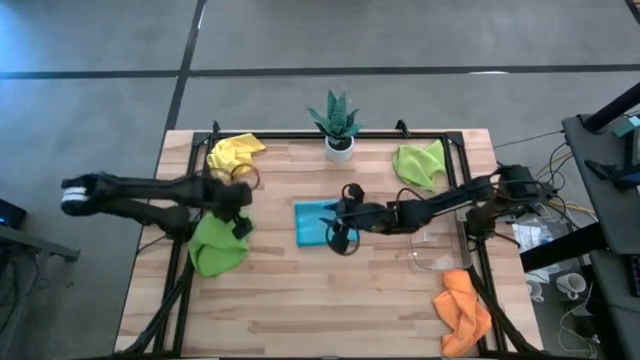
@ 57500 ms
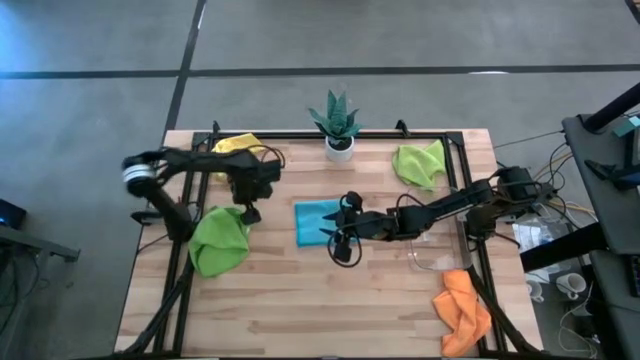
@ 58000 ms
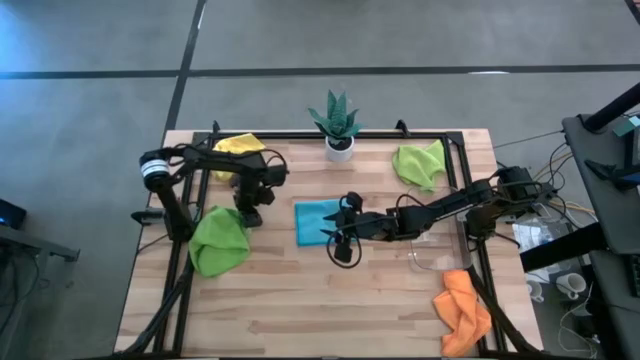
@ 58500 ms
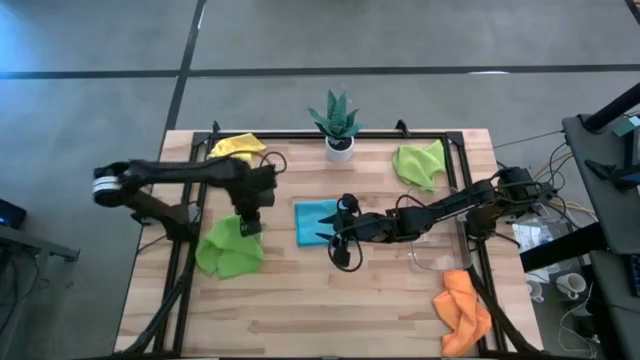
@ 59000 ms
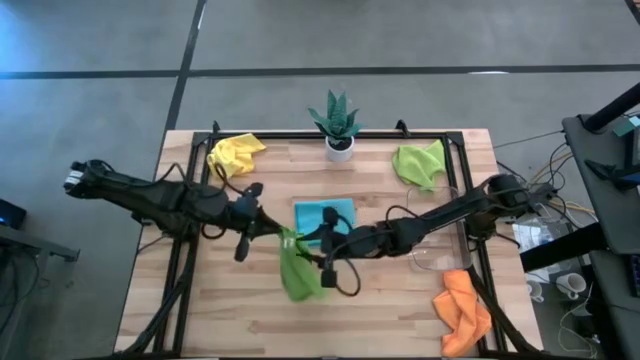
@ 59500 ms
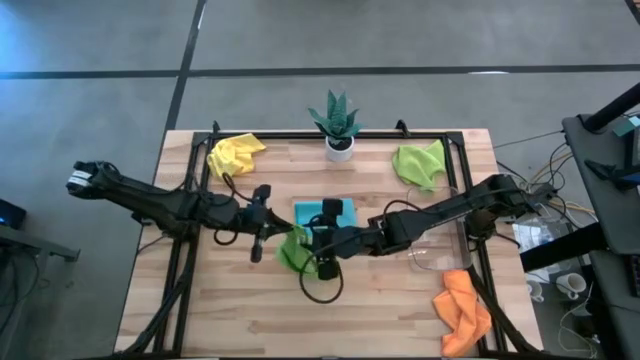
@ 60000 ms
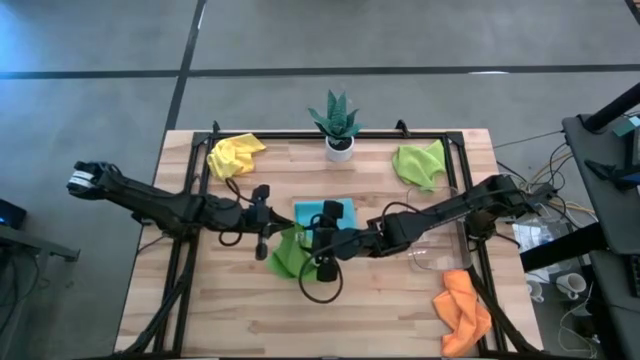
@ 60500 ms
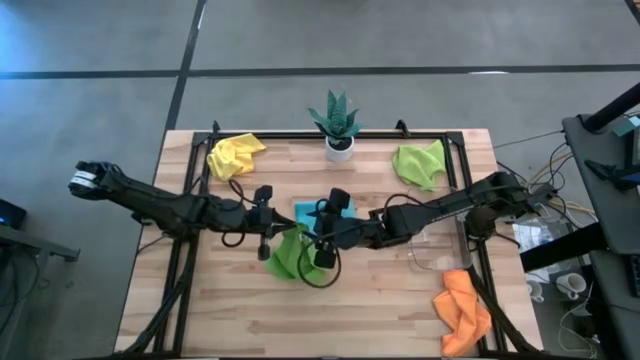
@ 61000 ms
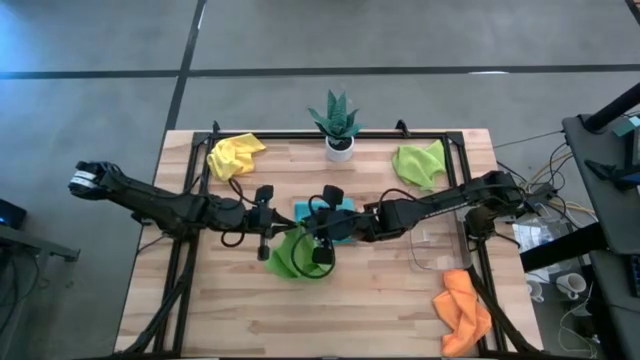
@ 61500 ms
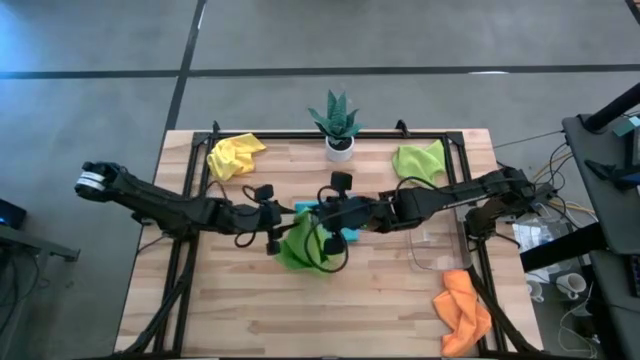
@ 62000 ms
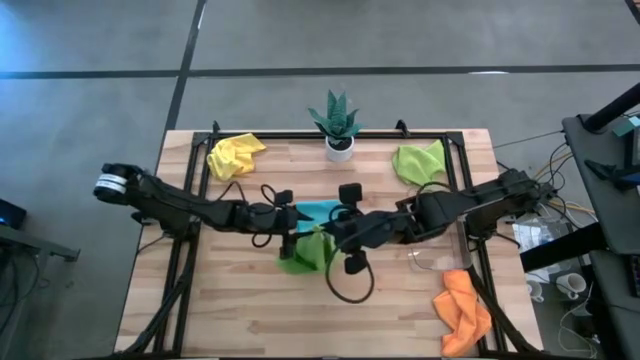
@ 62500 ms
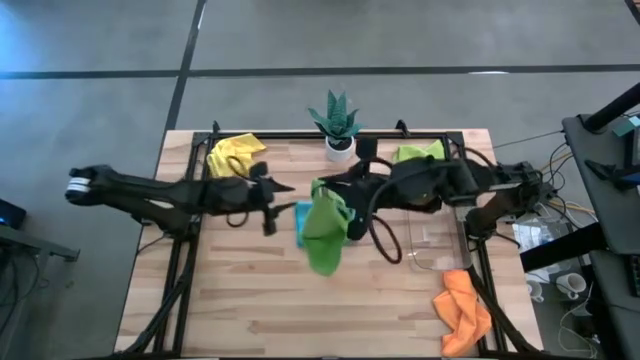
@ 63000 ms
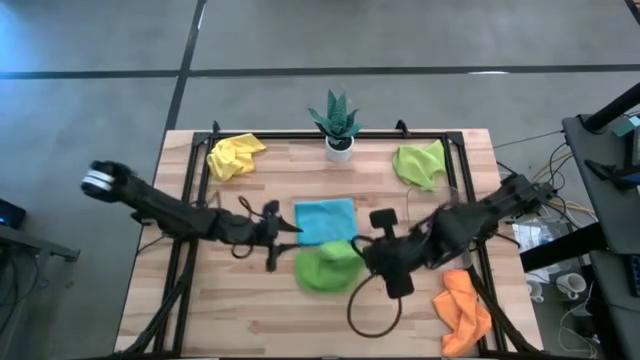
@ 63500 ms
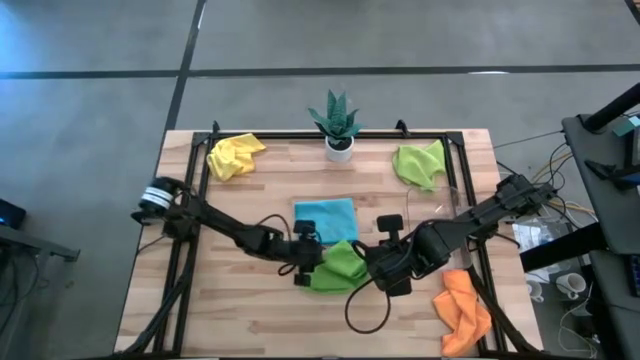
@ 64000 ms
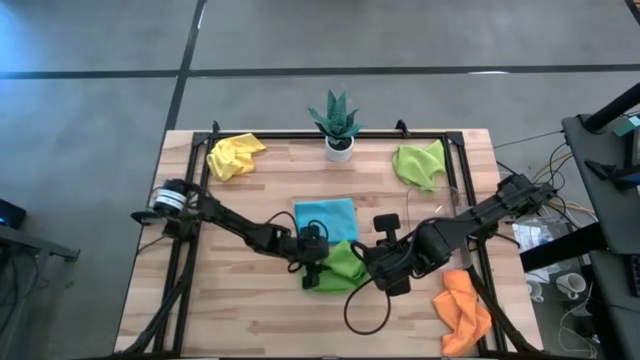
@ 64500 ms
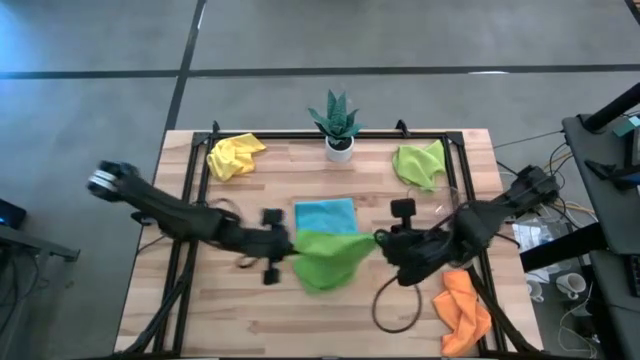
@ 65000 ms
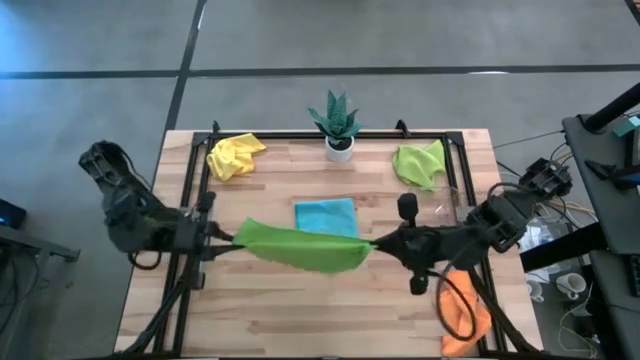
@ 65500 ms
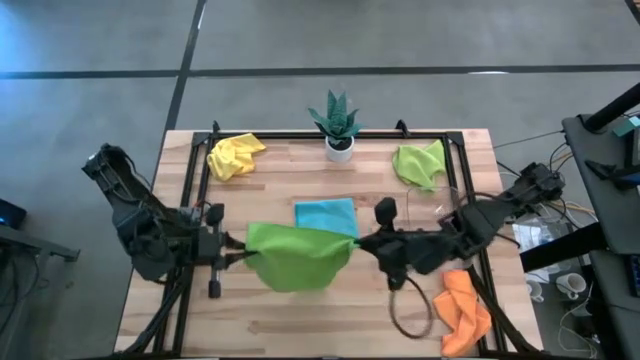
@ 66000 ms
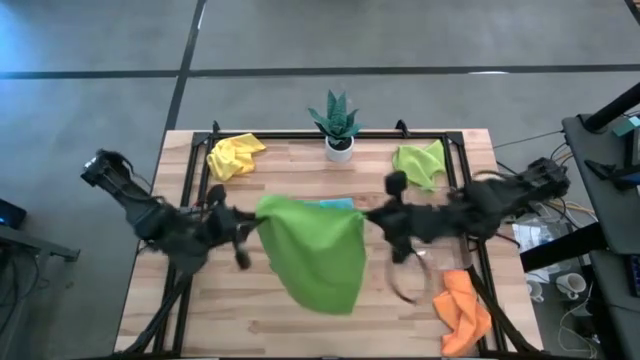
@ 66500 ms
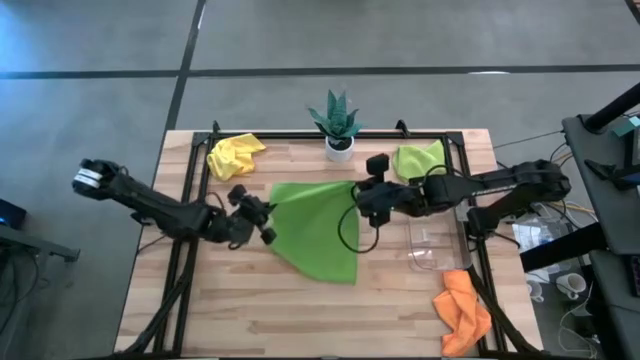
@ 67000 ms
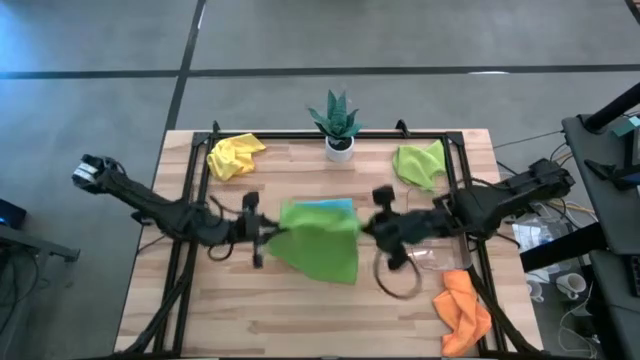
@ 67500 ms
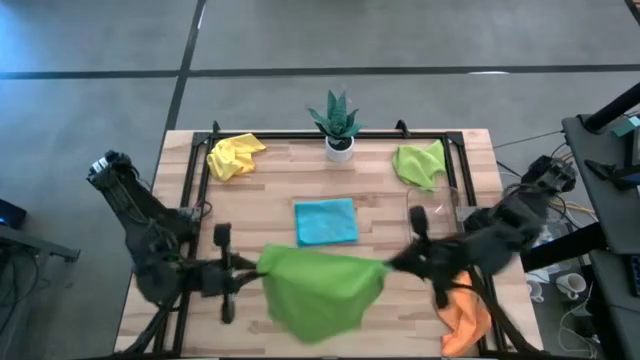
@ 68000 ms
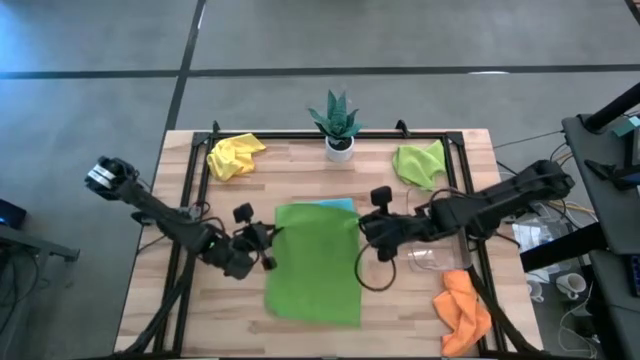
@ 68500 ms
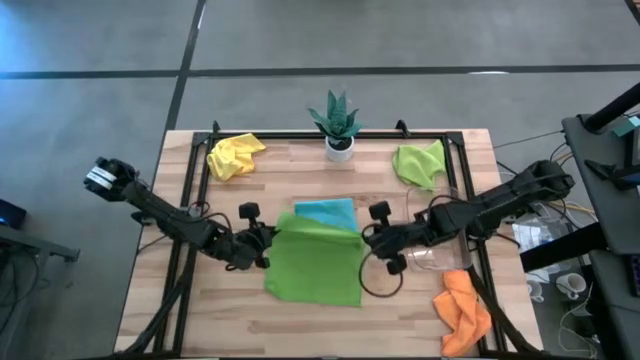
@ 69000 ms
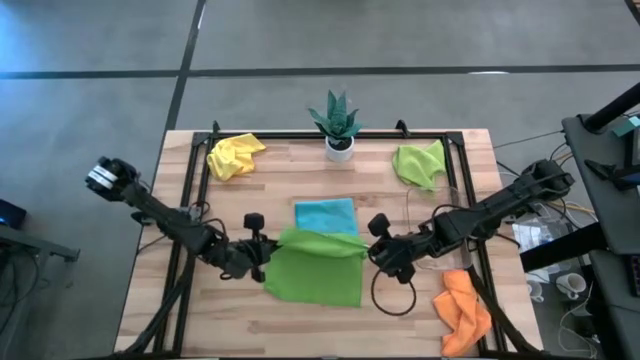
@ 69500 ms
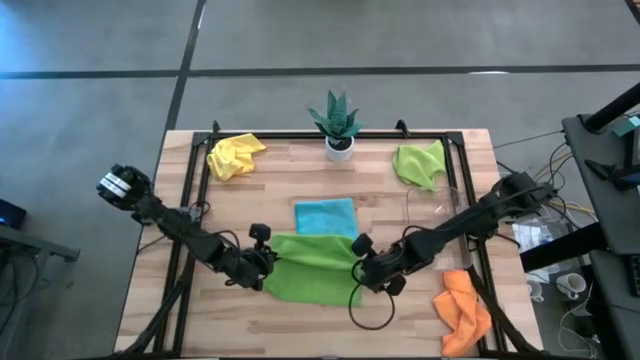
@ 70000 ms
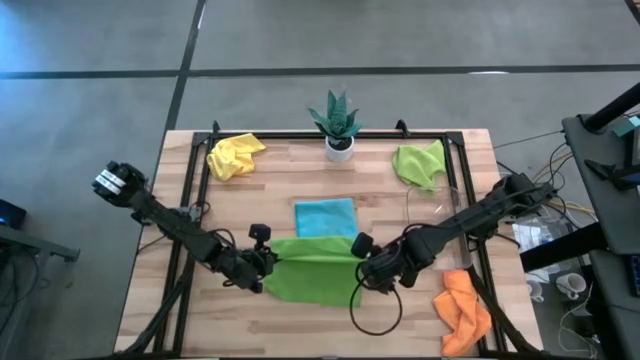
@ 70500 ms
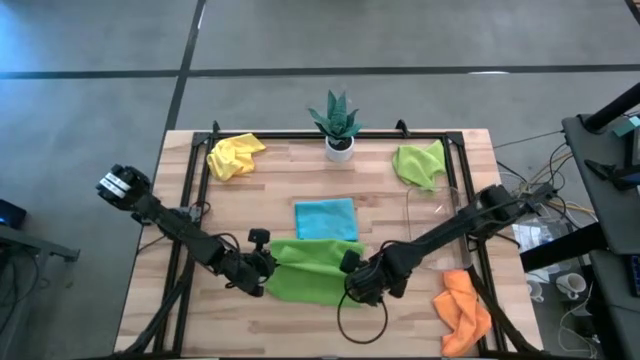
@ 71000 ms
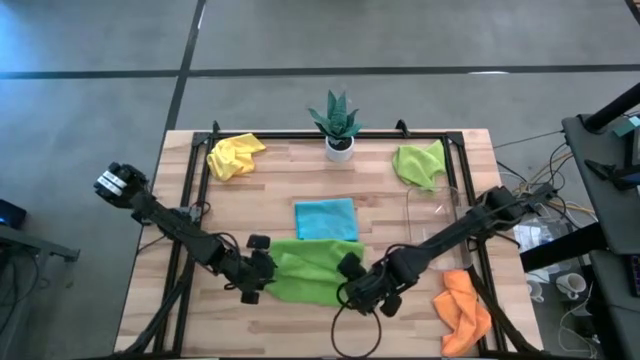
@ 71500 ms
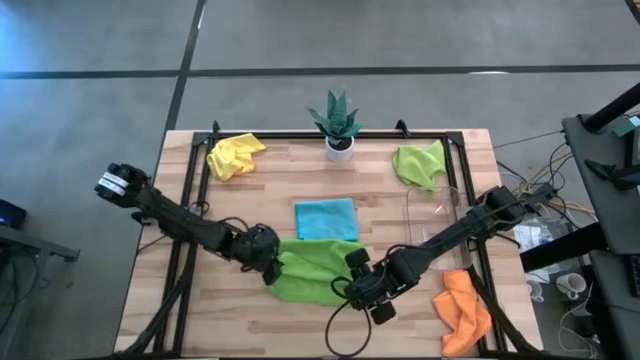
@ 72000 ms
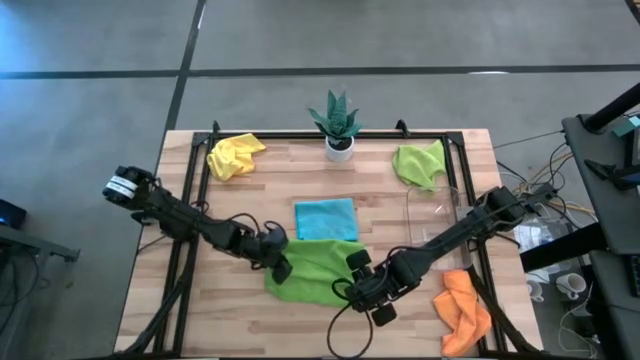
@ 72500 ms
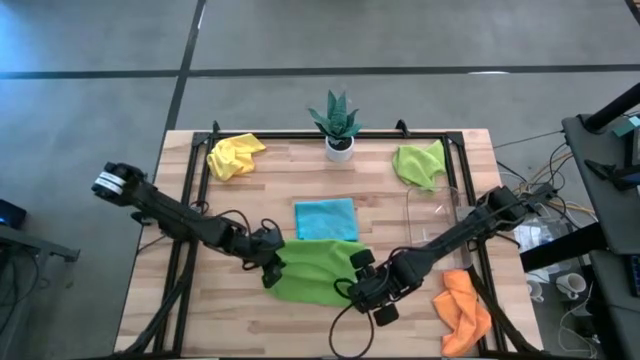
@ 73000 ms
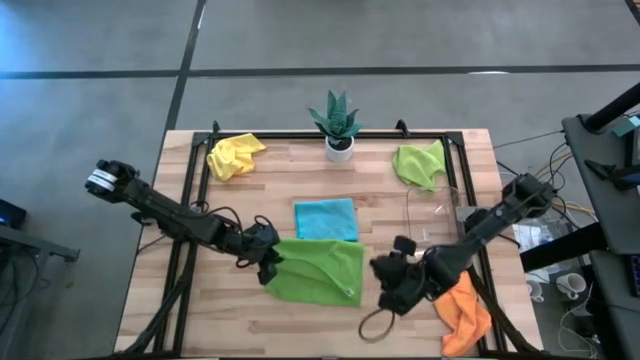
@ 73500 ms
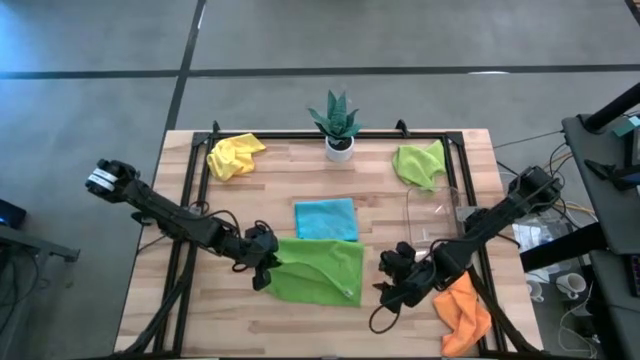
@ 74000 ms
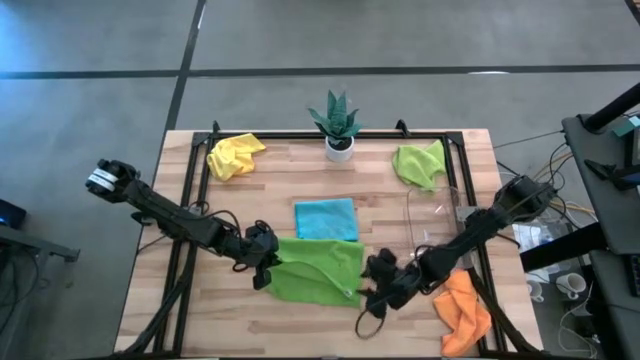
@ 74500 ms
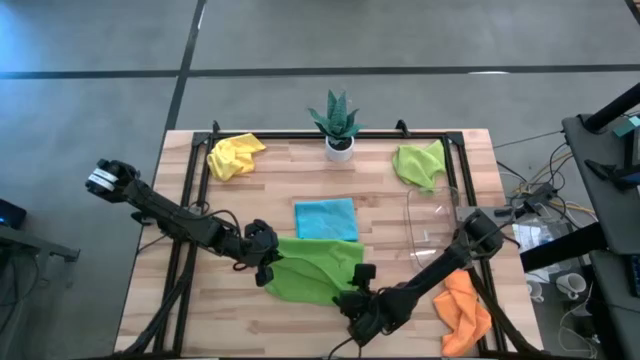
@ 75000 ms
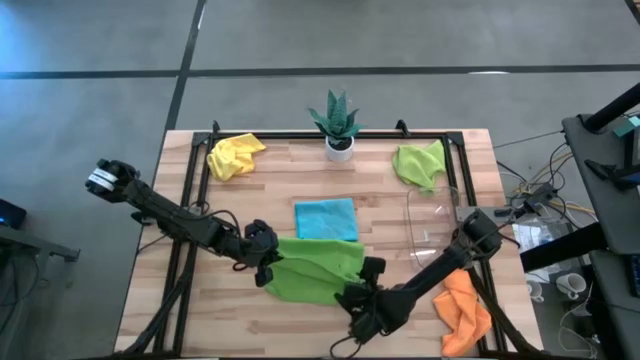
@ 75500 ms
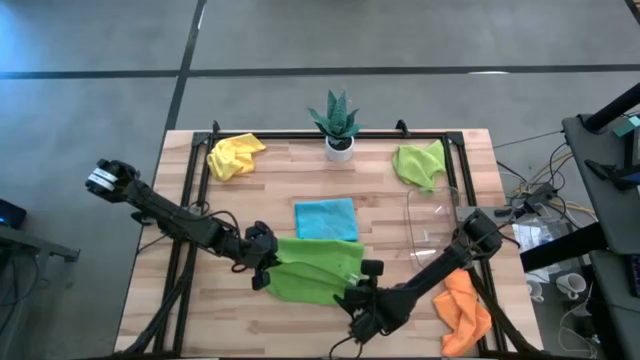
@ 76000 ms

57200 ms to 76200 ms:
Task: Fold microfiber towels
Fold the green towel on the table

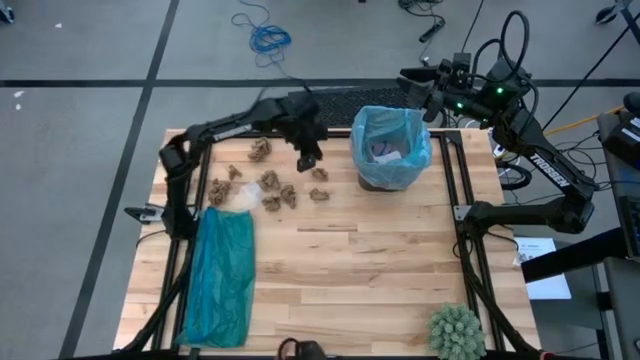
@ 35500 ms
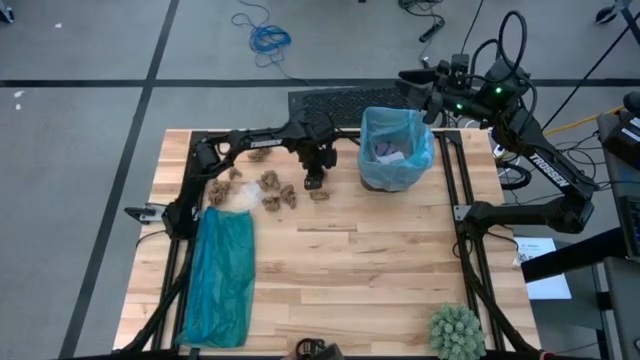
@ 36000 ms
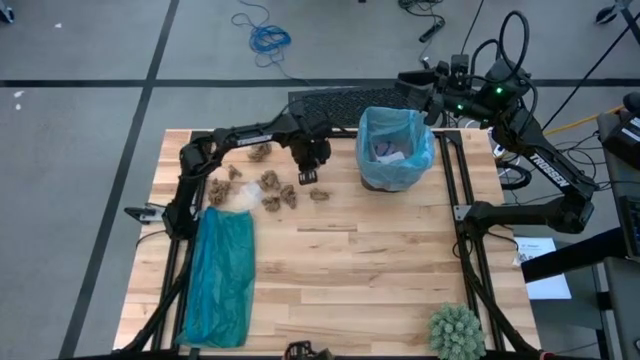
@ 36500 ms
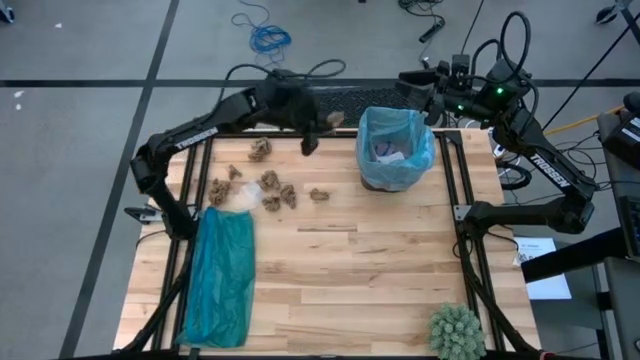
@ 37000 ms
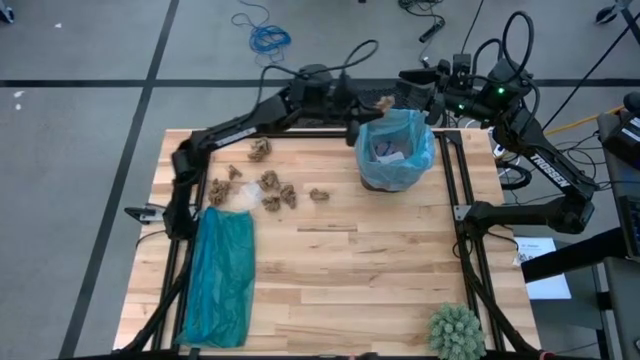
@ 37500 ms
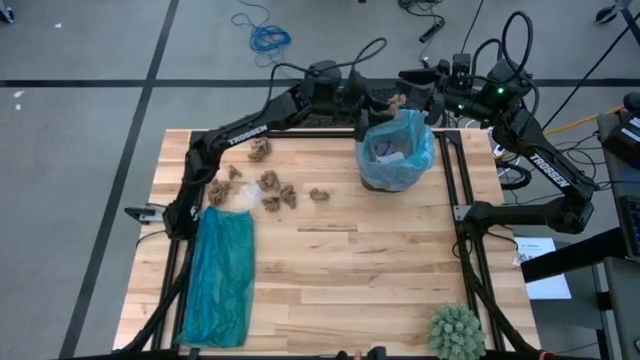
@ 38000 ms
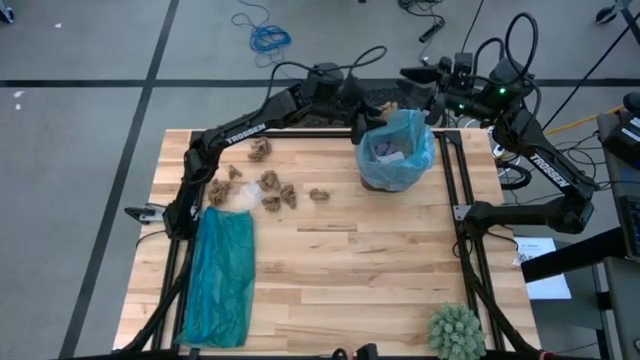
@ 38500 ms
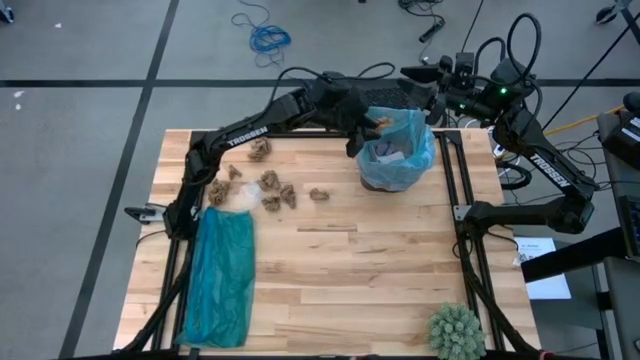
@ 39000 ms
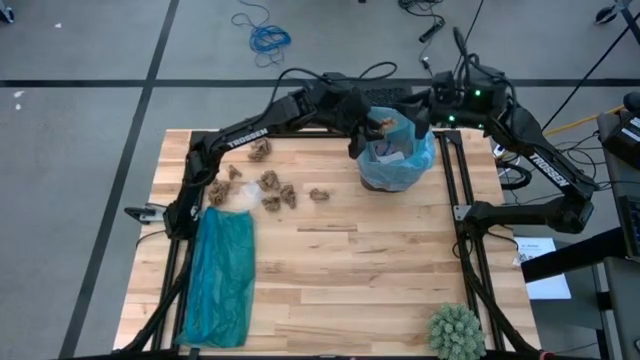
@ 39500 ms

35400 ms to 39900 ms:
Task: place trash/remove bag and relplace
Put the brown napkin into the trash bin
